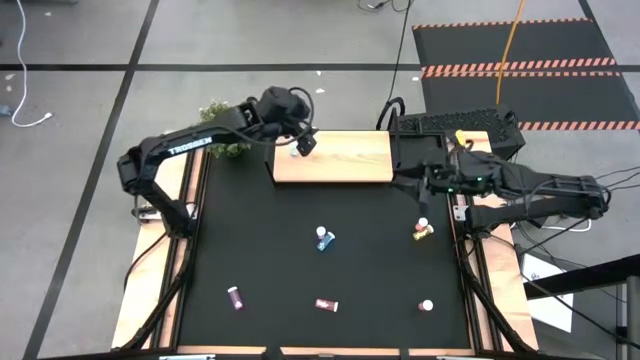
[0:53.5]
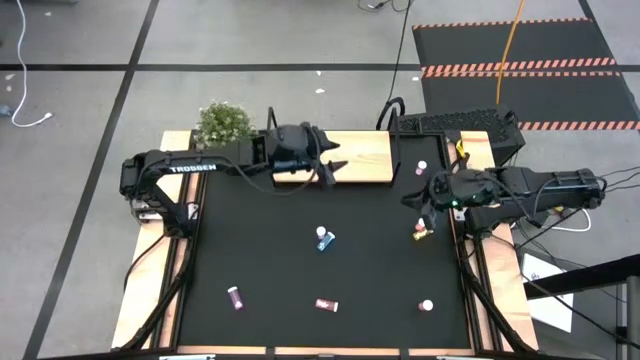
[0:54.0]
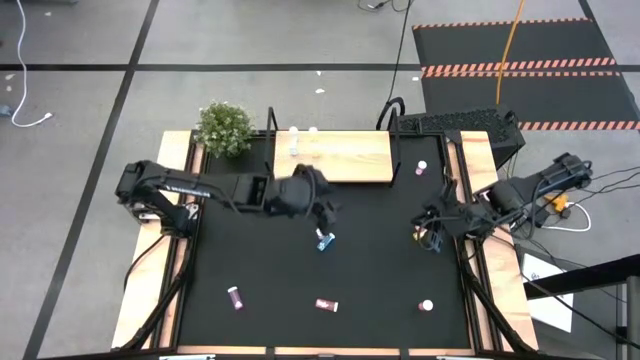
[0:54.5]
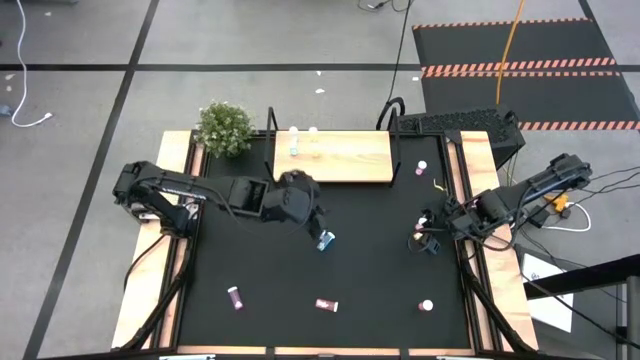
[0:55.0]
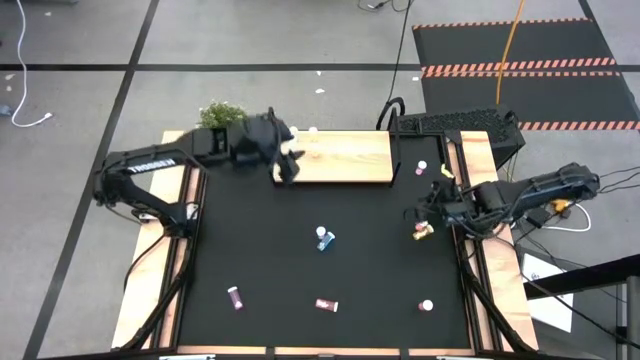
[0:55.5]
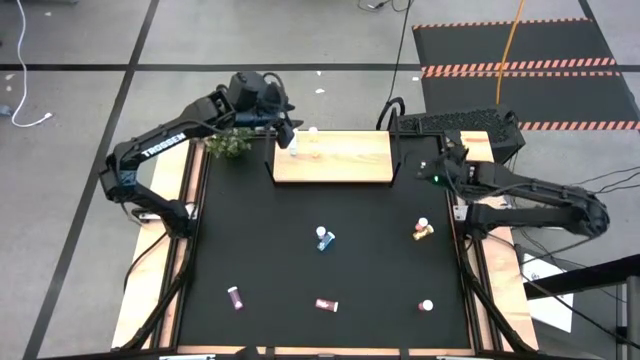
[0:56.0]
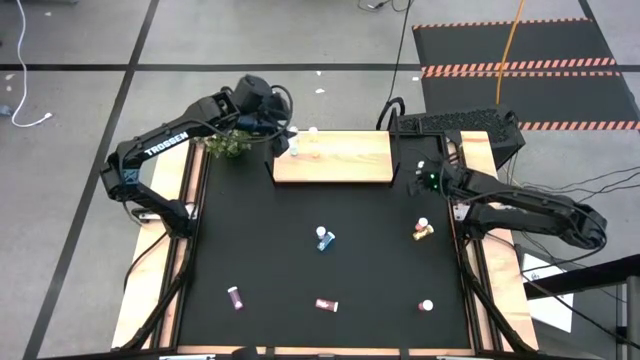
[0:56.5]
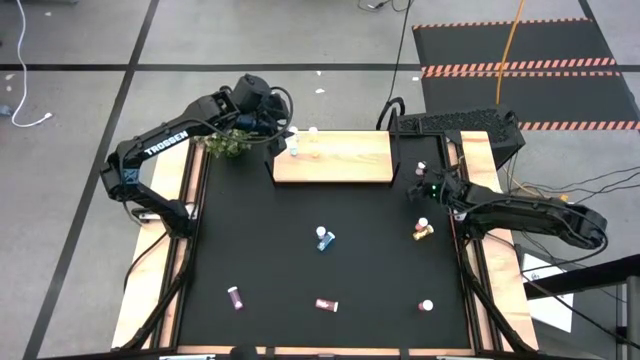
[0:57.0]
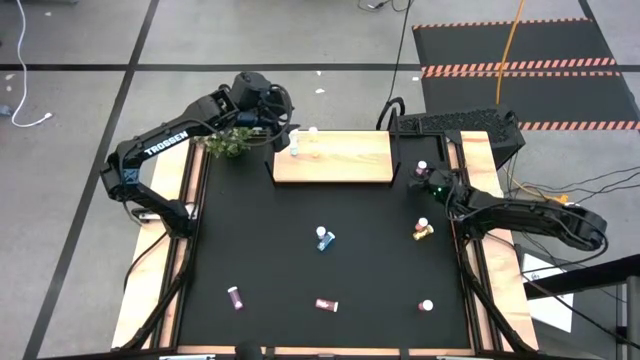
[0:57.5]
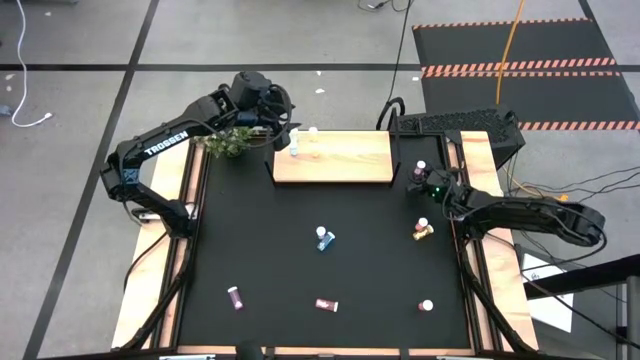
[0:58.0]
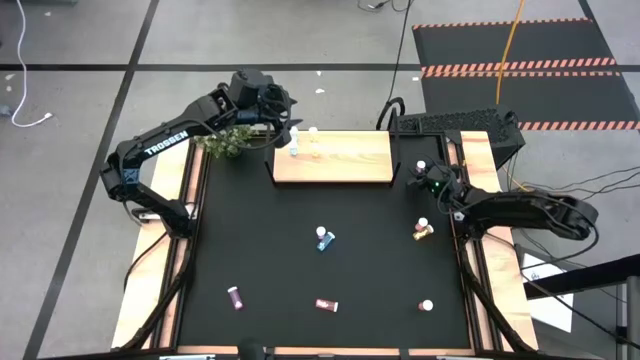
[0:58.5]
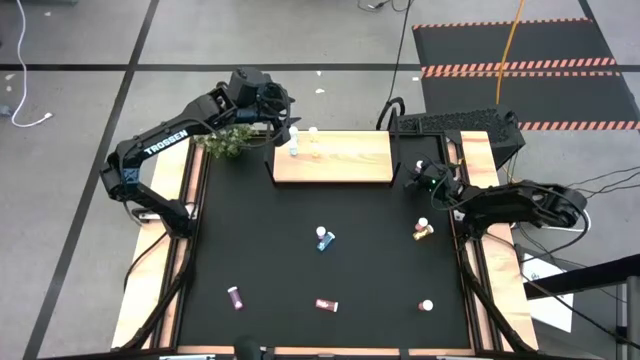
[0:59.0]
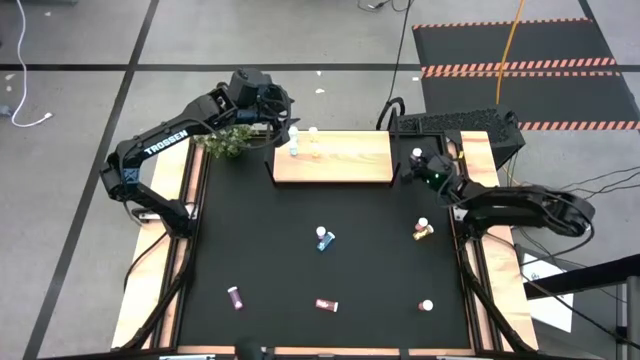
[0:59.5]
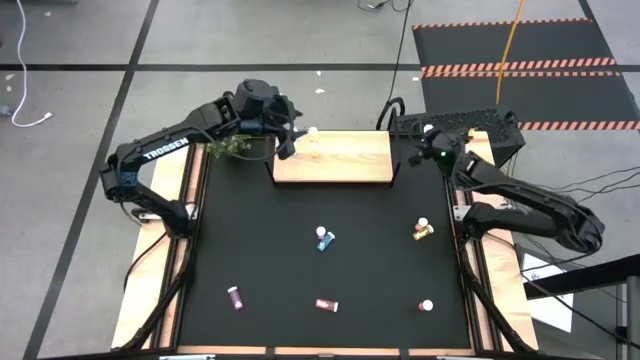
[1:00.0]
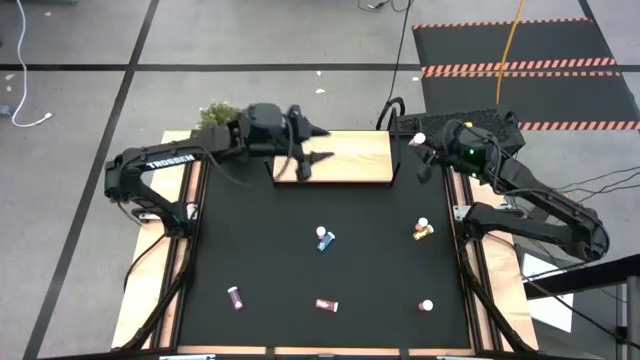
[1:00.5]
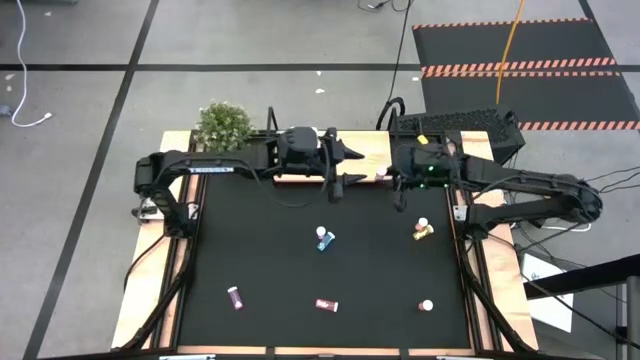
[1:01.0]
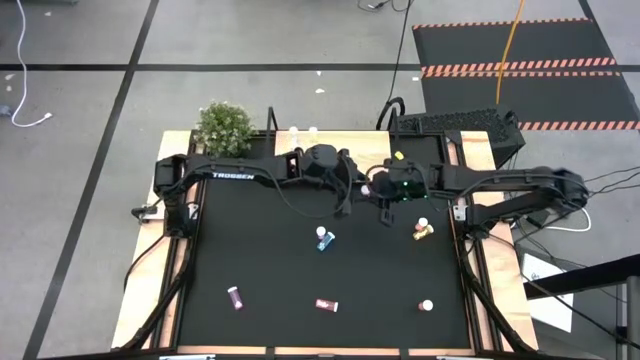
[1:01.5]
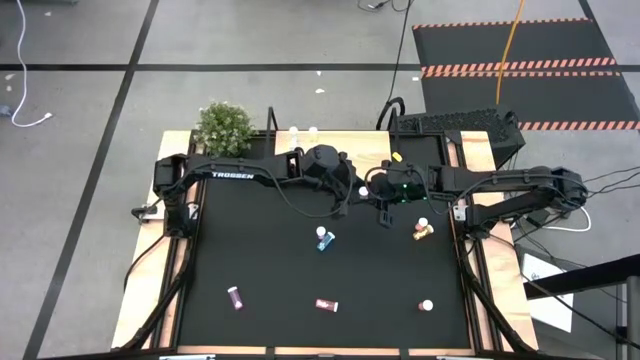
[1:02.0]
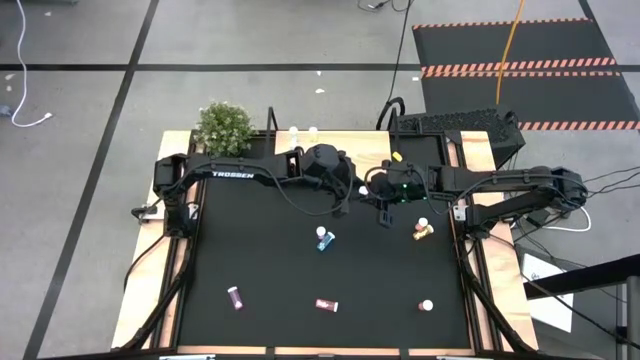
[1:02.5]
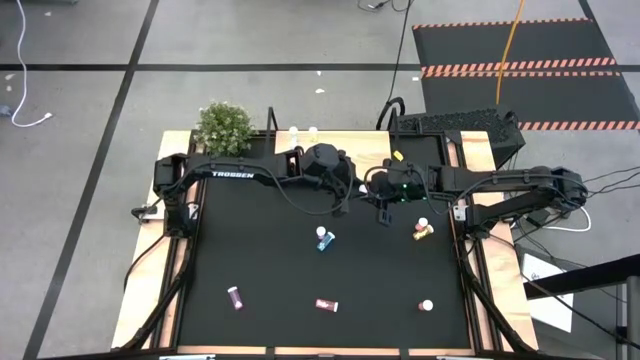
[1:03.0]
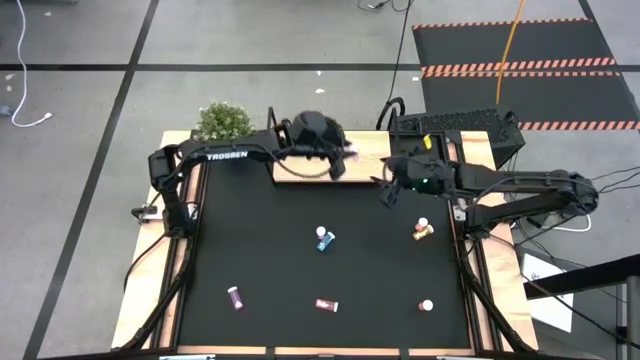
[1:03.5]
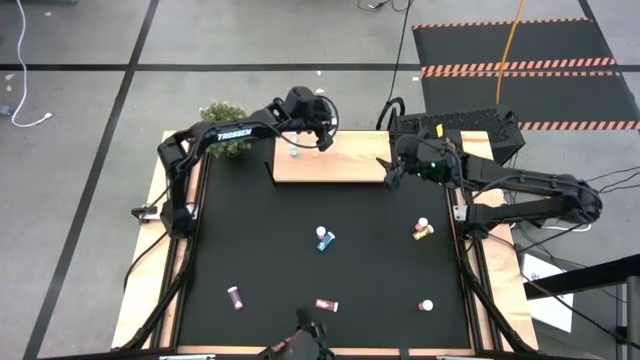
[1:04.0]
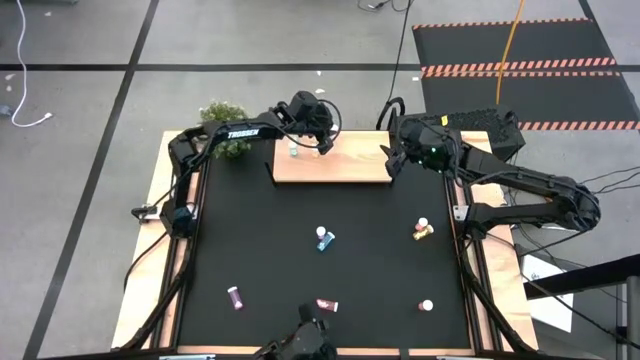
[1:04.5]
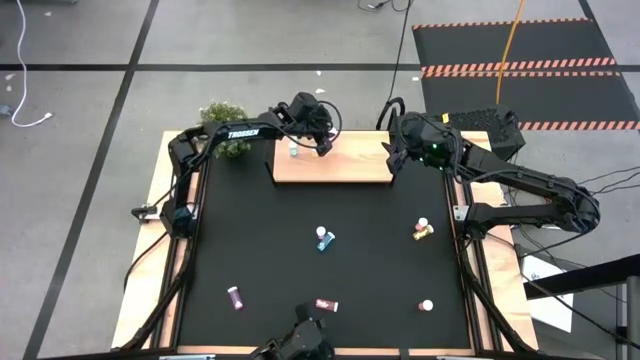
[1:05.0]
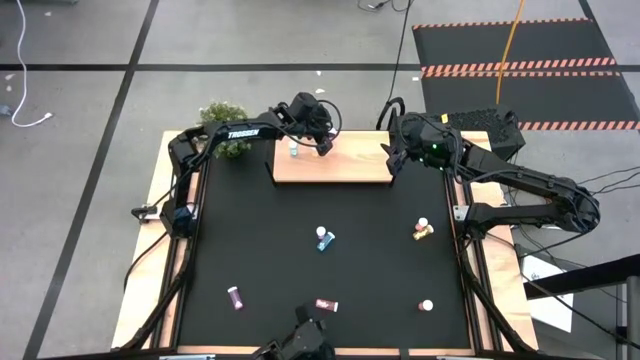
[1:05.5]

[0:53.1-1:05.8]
Task: Pick and place medicine bottles onto shelf by color
Put the top right pink pill bottle on the shelf

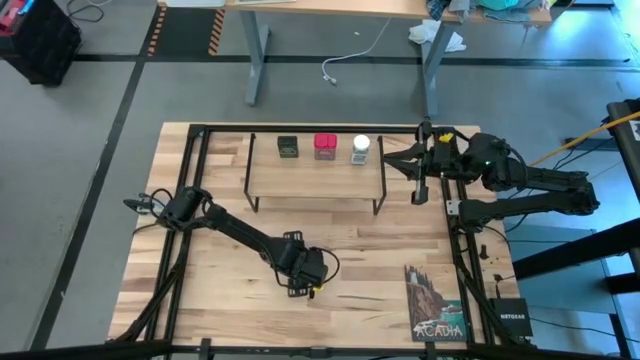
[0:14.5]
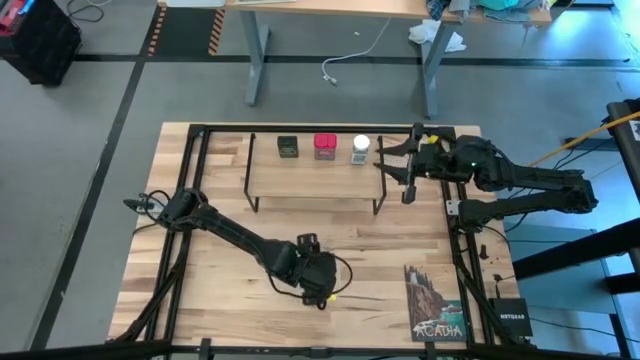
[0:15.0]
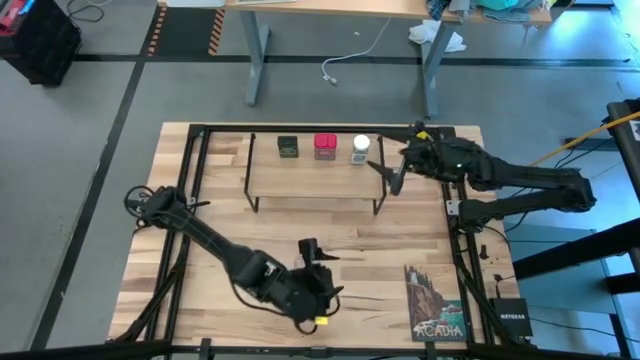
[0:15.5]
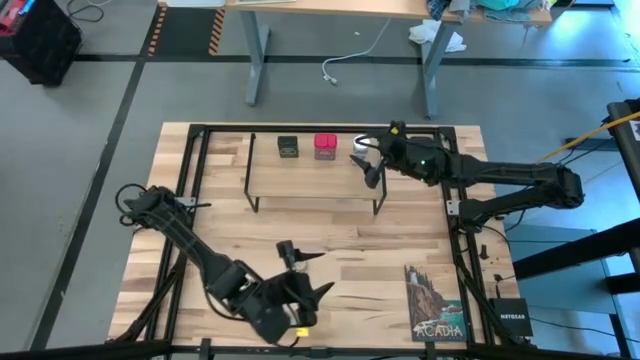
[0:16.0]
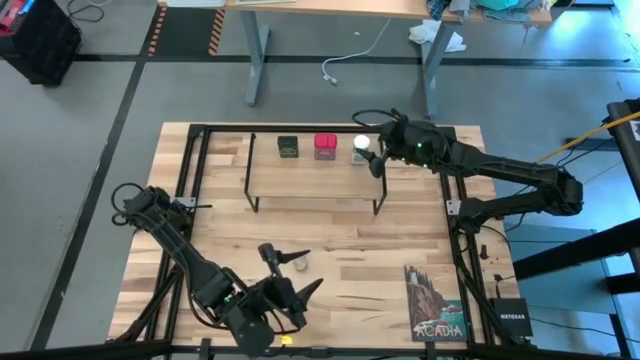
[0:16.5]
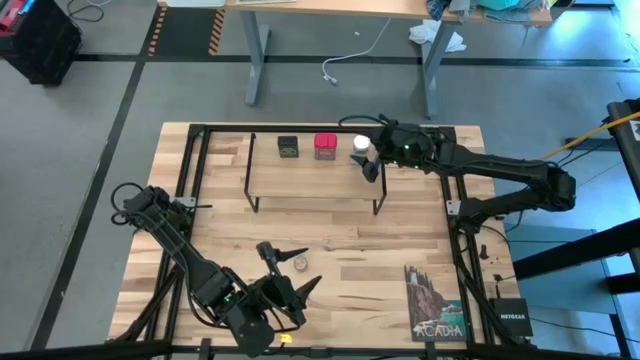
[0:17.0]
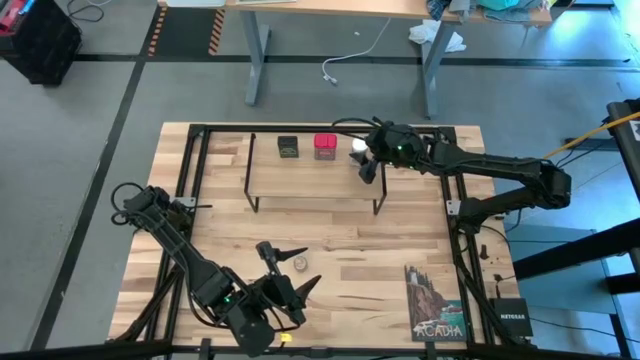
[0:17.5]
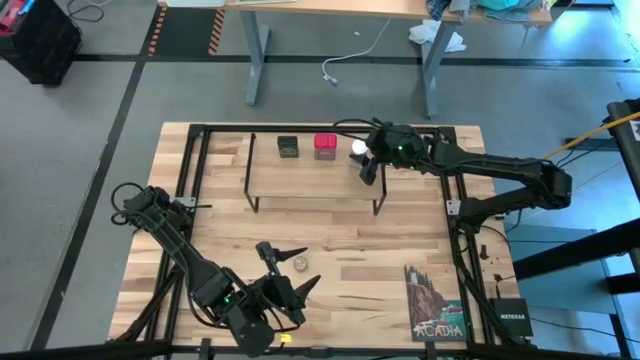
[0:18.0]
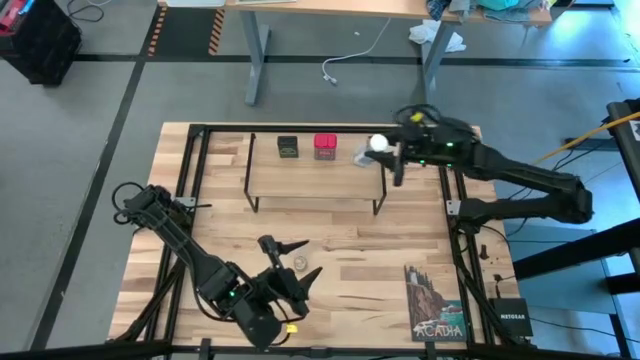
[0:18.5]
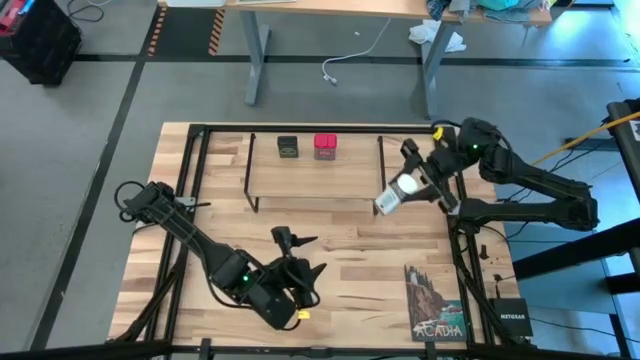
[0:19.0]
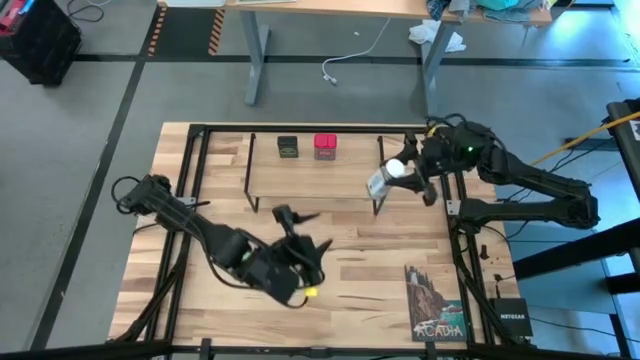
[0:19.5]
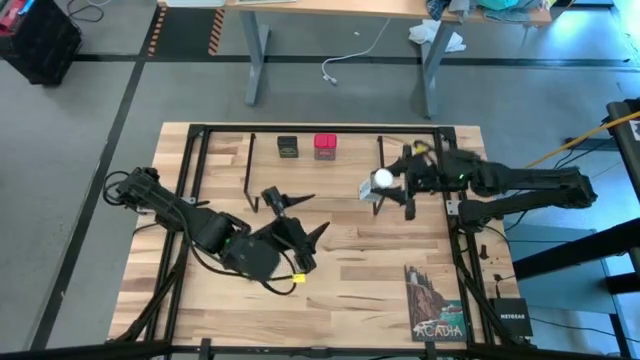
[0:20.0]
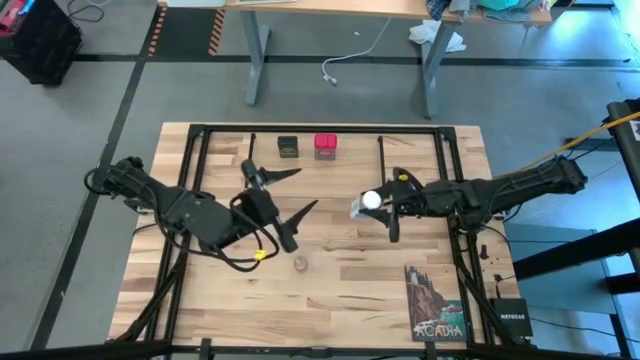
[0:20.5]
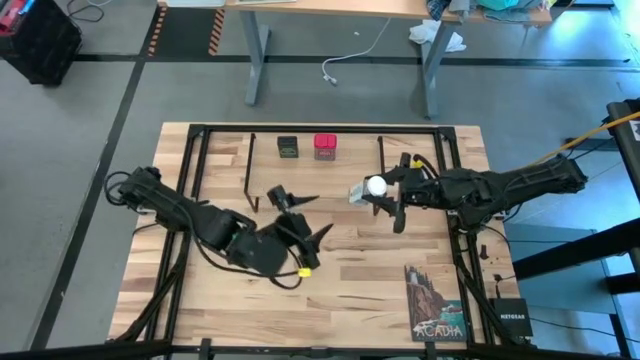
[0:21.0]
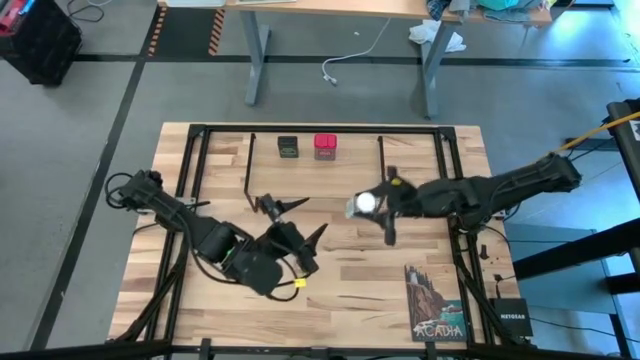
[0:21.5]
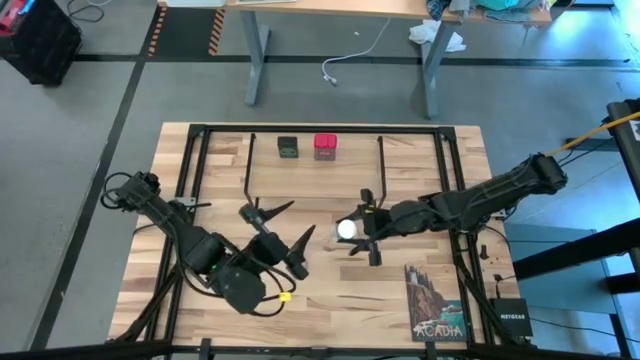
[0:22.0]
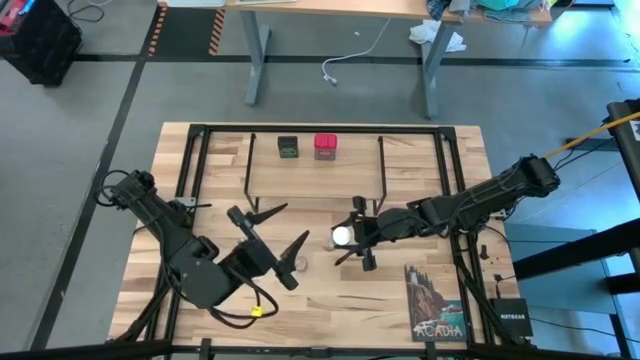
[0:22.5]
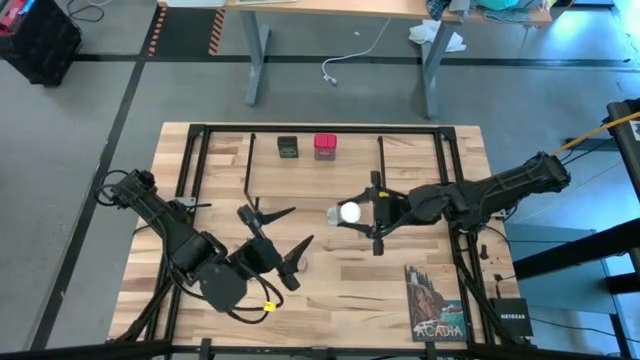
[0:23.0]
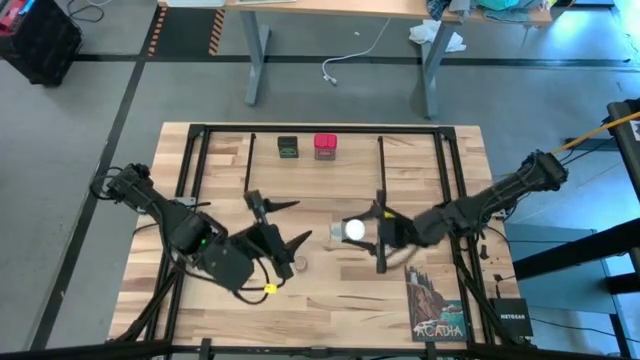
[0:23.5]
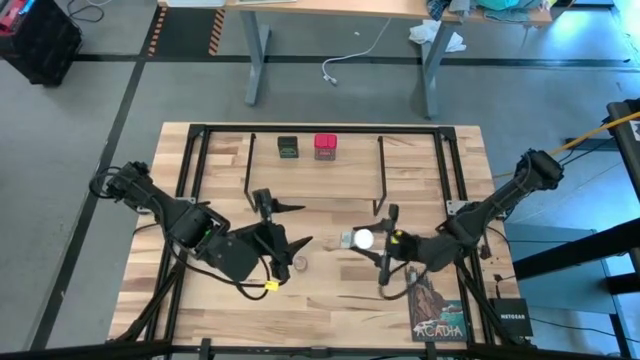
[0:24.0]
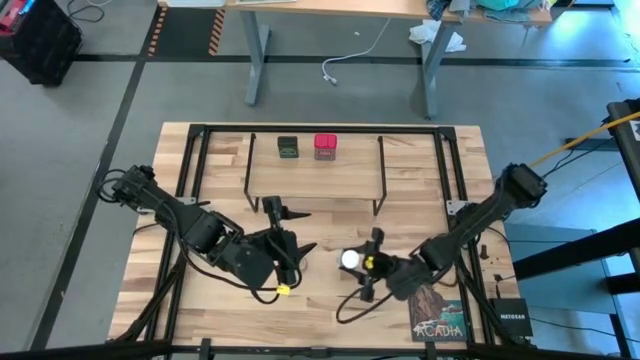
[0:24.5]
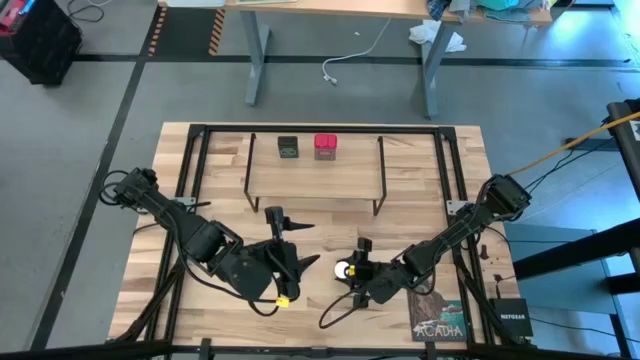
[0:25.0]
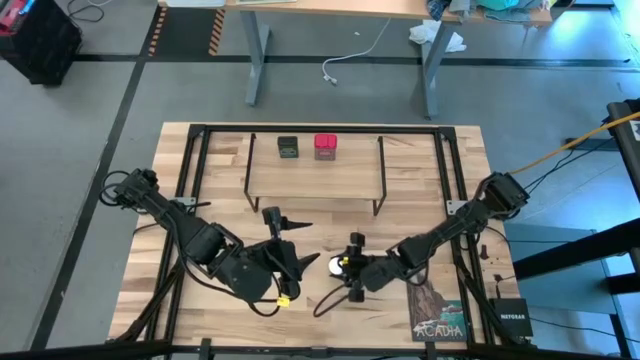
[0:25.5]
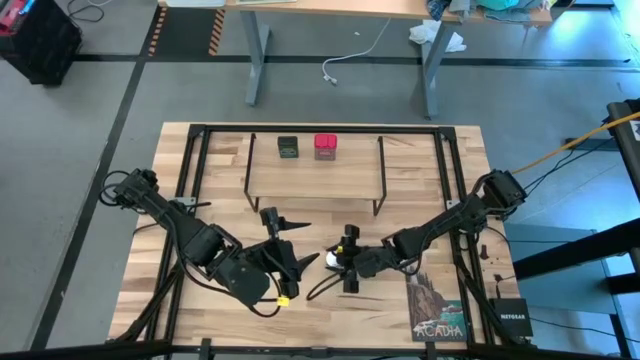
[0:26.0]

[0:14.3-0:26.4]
Task: Shelf spices
Remove the white seasoning bottle from the shelf
